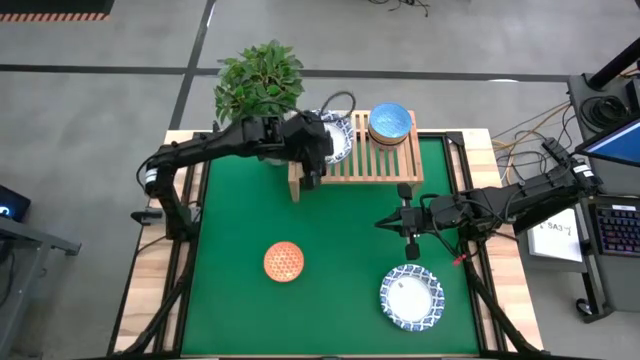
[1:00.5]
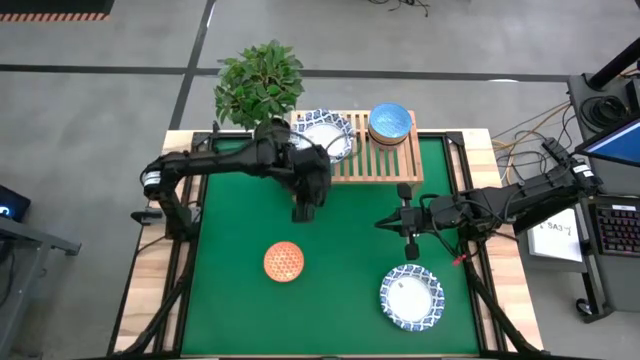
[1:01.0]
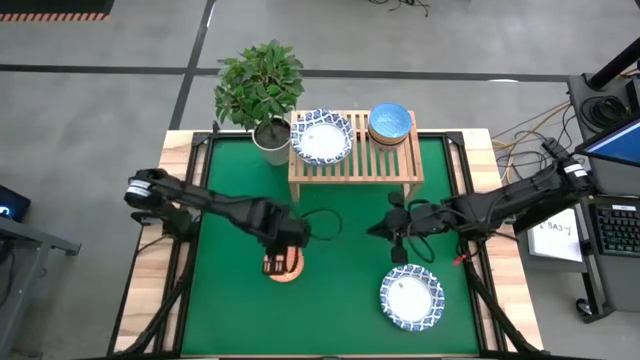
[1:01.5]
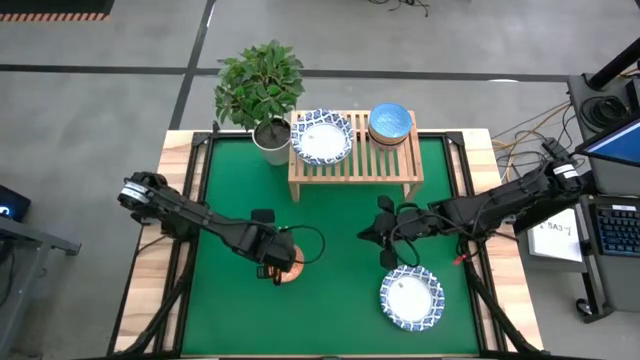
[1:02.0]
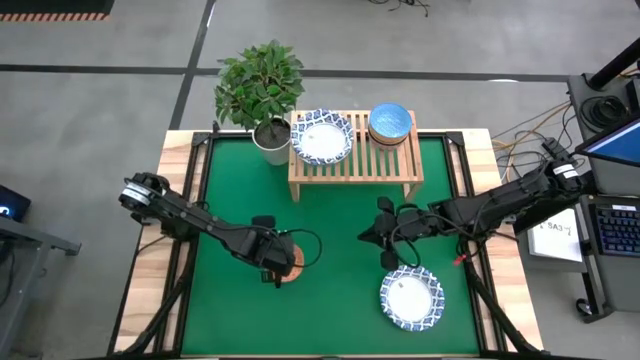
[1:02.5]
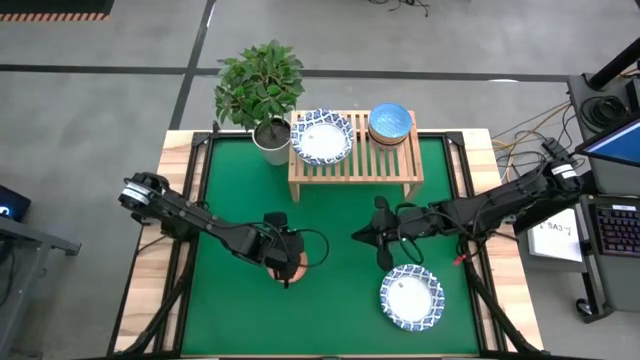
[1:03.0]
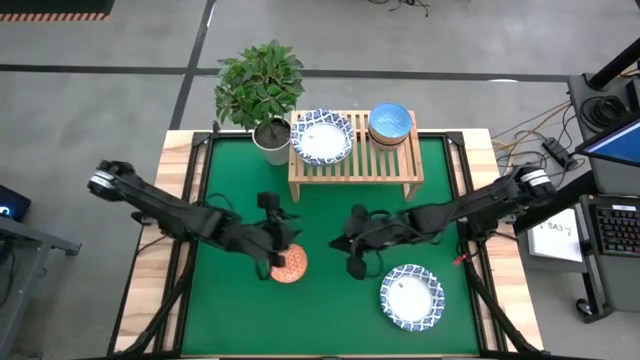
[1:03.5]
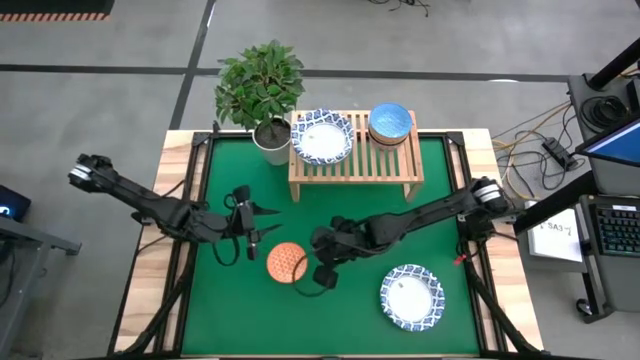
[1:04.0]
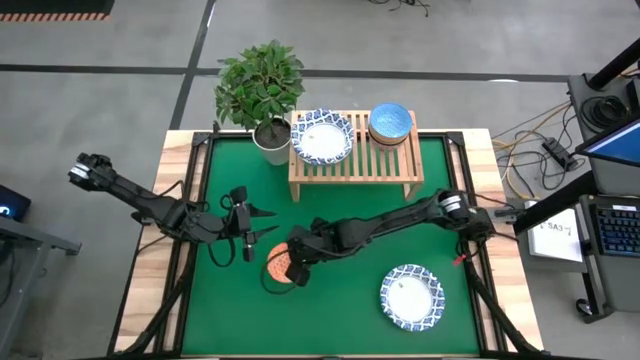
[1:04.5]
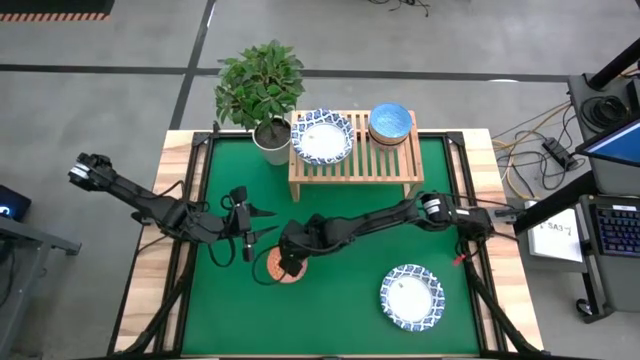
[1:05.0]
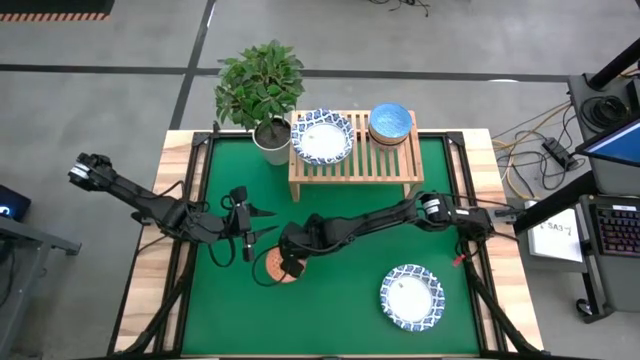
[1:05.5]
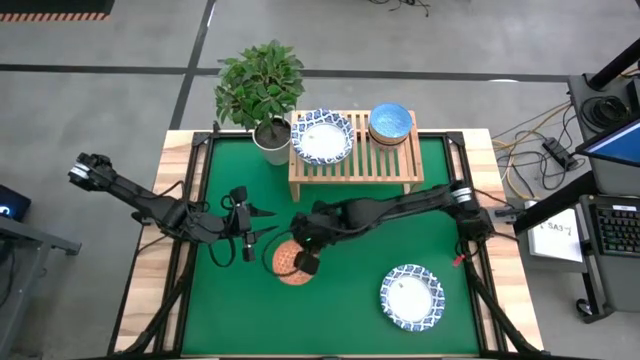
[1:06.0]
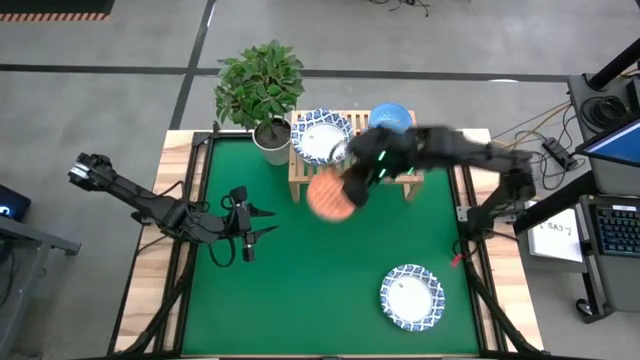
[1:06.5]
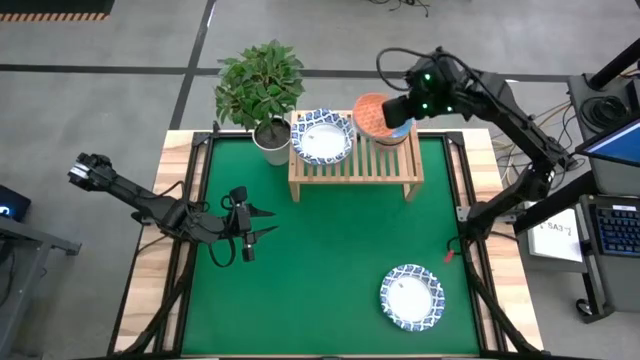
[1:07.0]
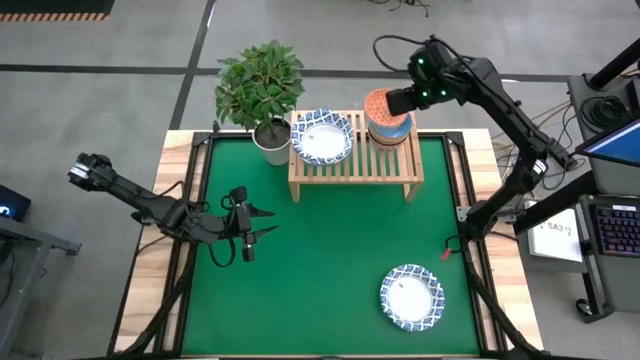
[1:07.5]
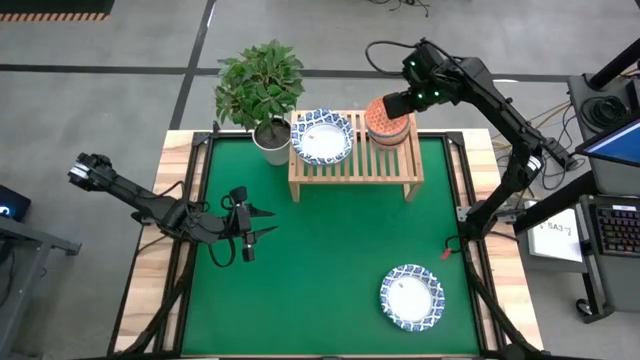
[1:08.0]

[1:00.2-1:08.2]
Task: Place and stack bowls onto a shelf
Stack the light blue bowl on top of the orange patterned bowl on the shelf

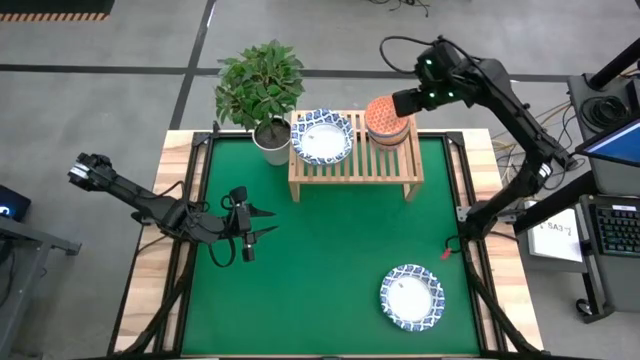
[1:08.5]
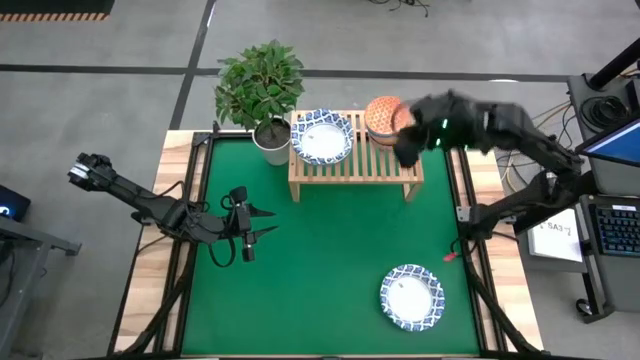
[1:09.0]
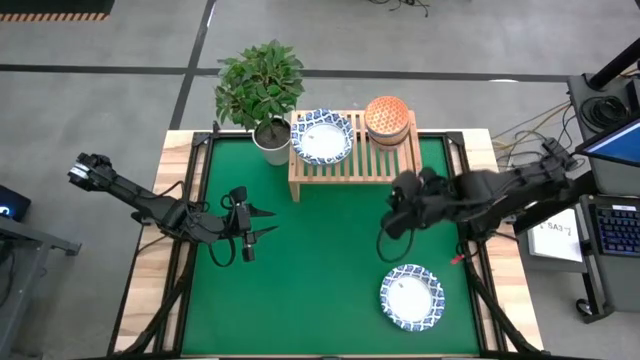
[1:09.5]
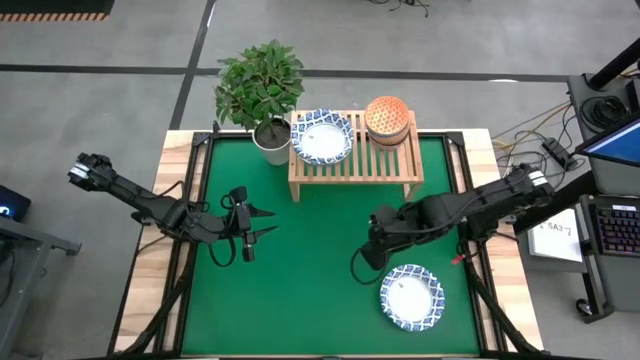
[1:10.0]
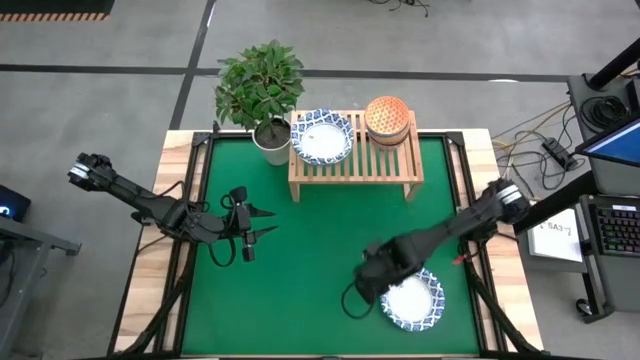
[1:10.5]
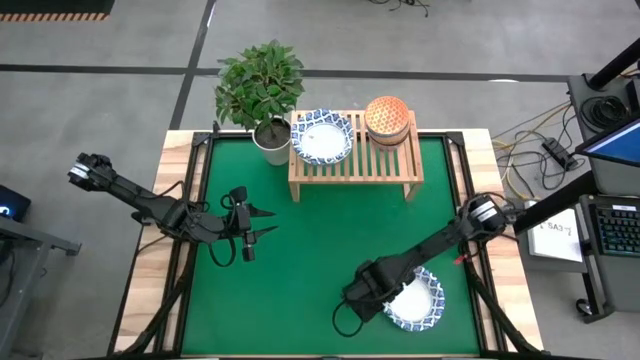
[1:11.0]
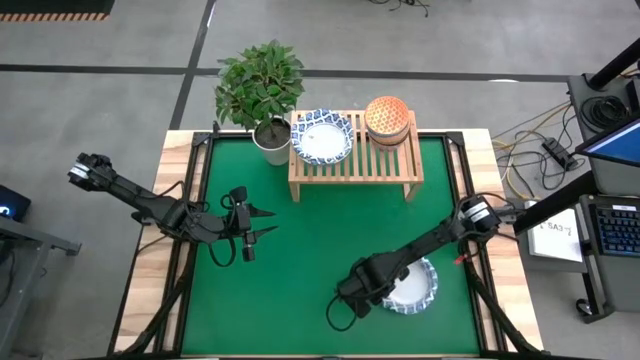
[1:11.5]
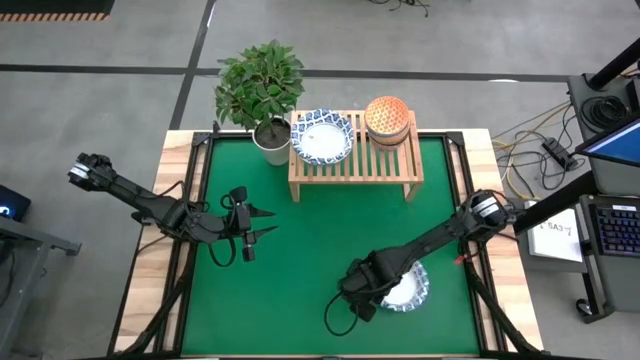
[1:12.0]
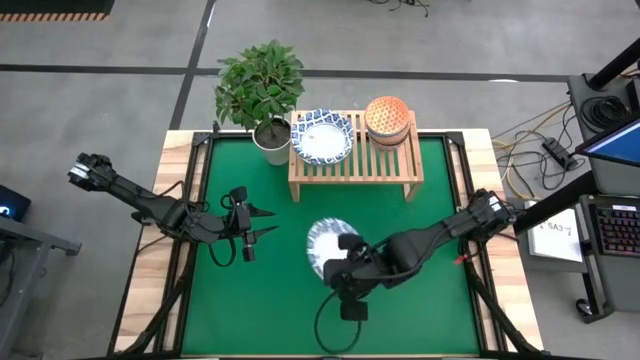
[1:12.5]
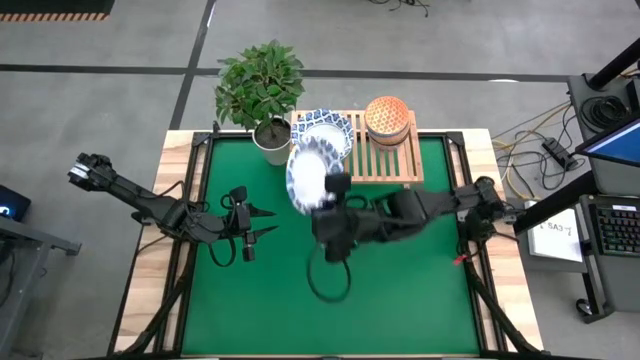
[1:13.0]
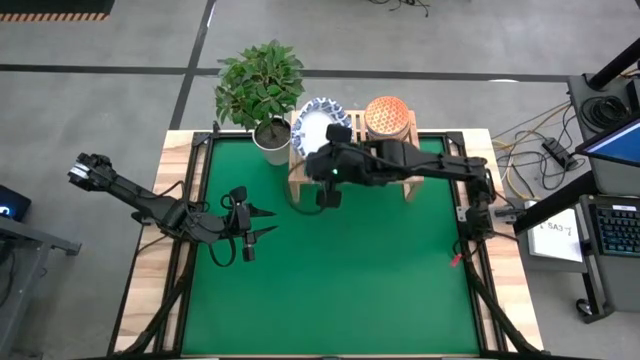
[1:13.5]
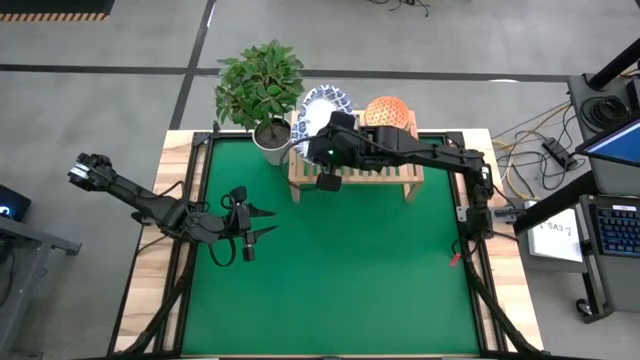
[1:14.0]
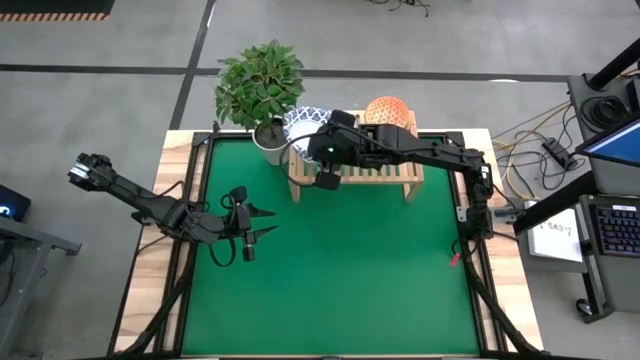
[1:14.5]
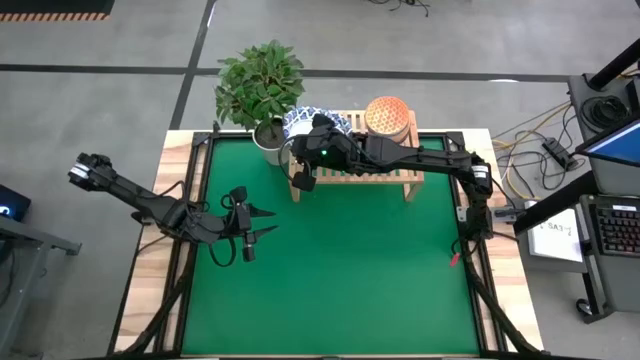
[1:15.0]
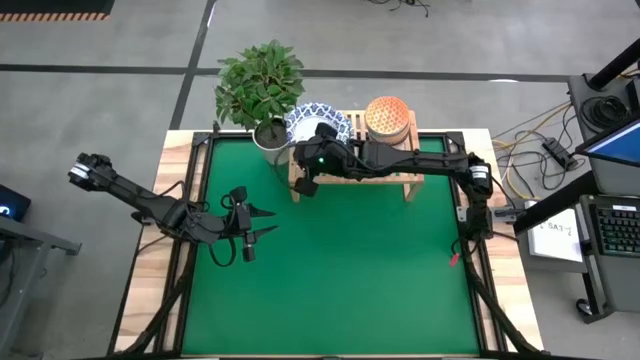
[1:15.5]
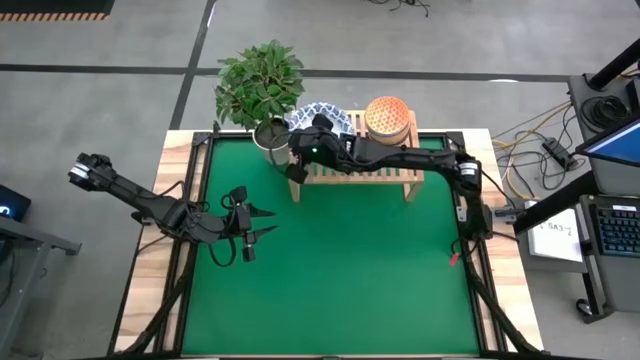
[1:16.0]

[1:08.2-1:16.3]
Stack the white patterned bowl on top of the white patterned bowls on the shelf

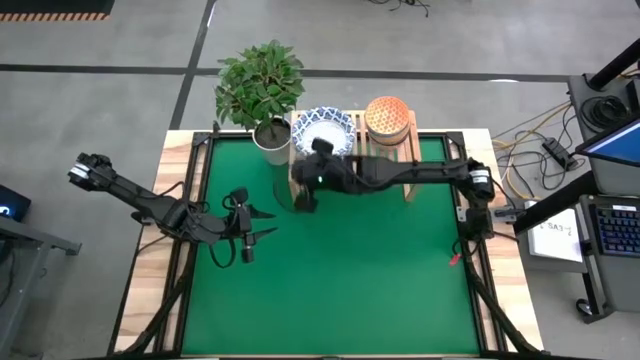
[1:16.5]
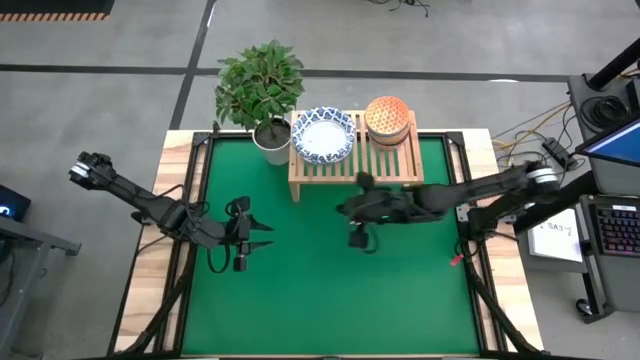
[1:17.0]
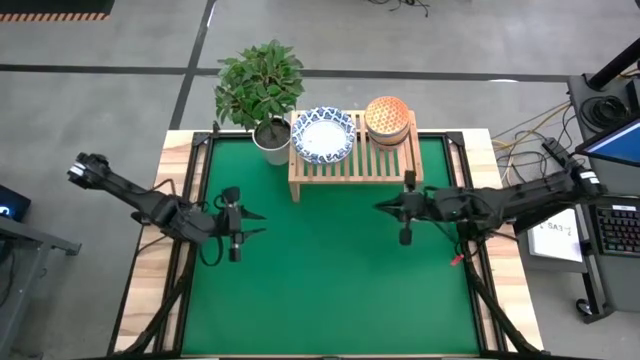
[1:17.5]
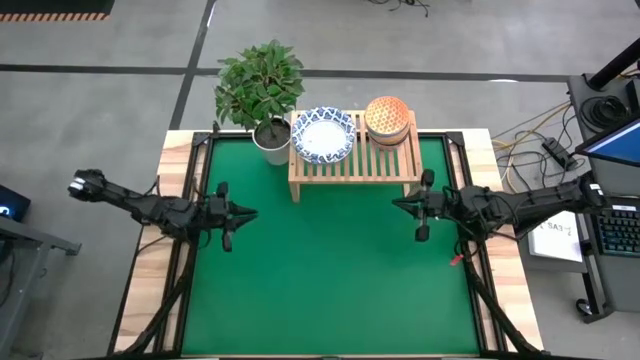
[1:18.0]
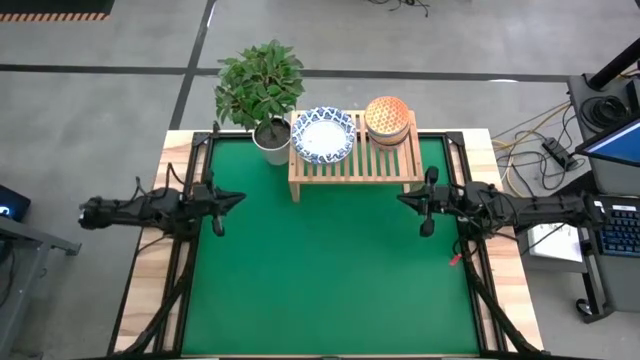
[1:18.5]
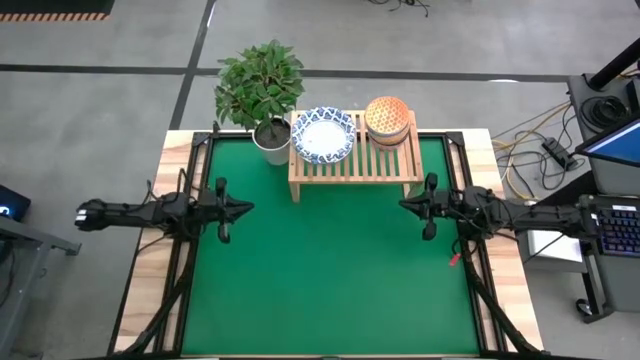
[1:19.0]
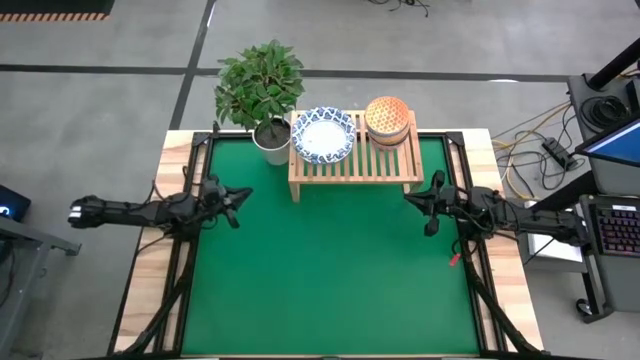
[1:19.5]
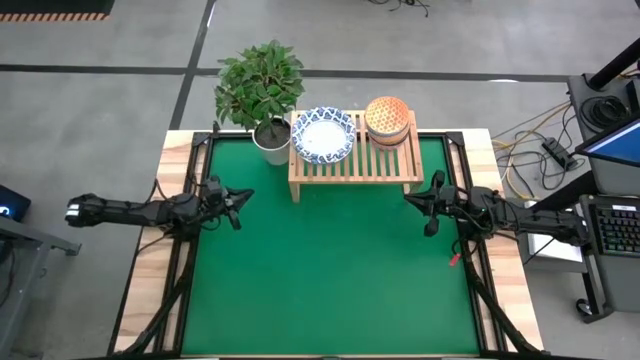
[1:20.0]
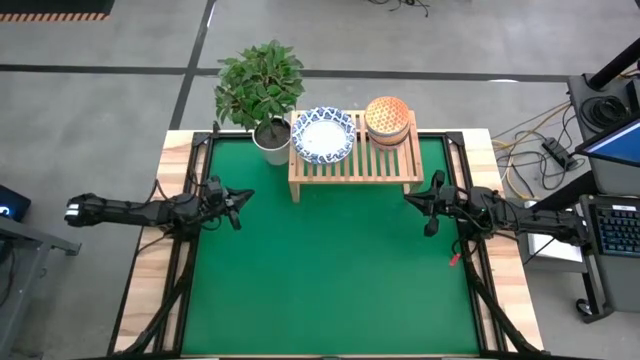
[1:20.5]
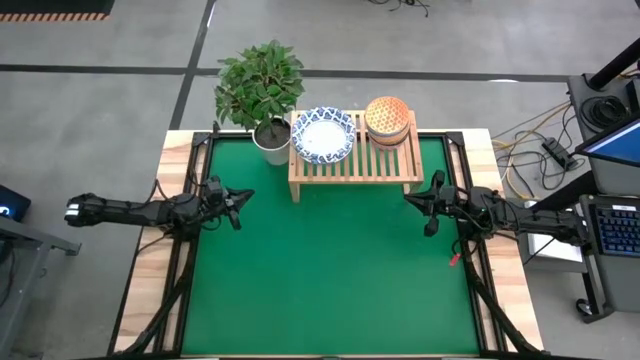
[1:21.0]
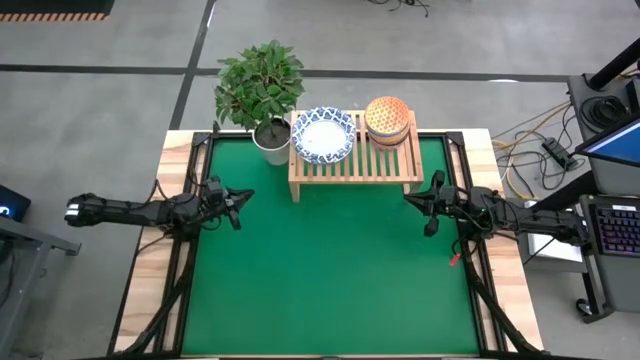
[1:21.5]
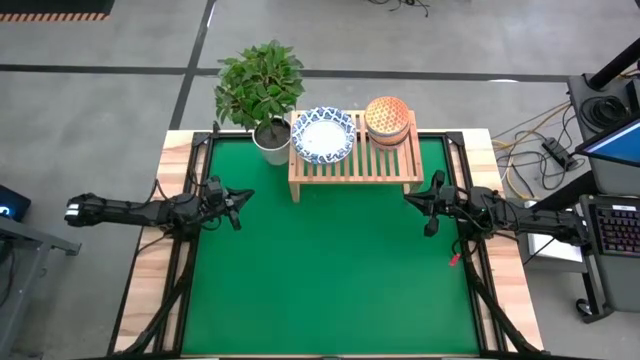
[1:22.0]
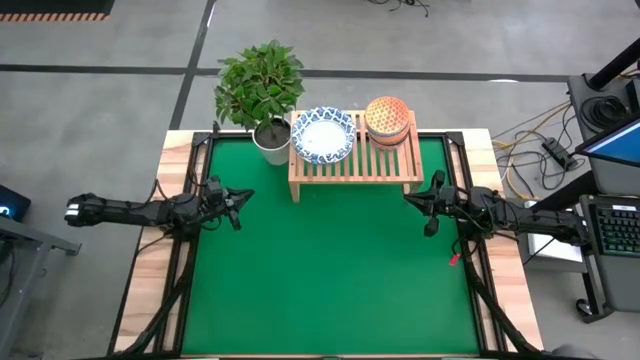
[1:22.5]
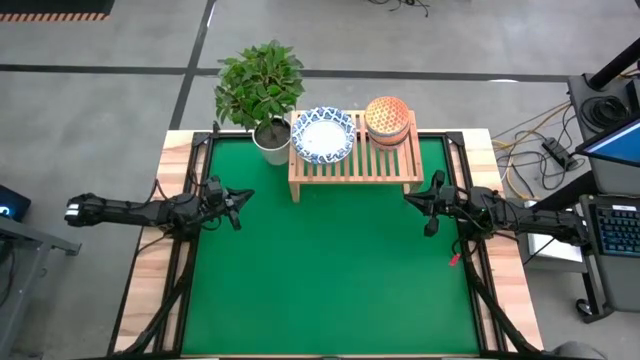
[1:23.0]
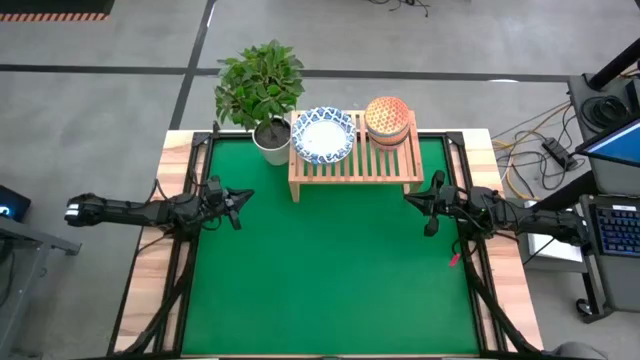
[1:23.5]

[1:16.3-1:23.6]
Return to Home Position
